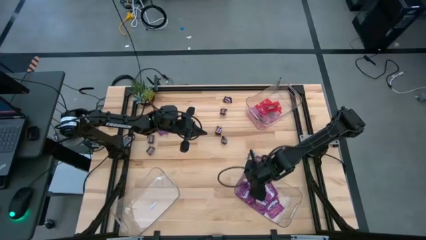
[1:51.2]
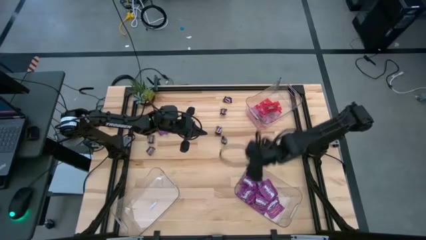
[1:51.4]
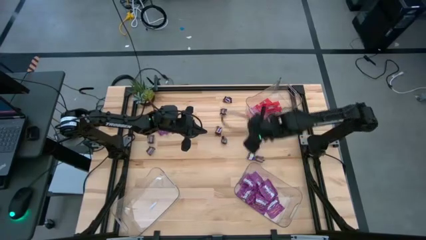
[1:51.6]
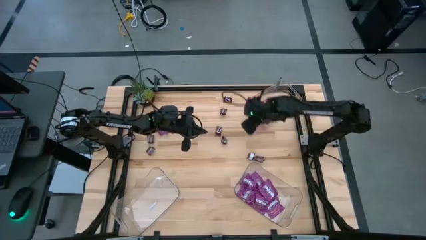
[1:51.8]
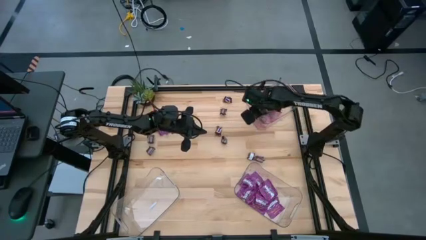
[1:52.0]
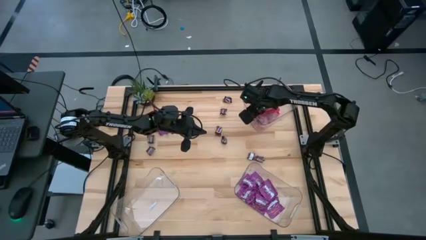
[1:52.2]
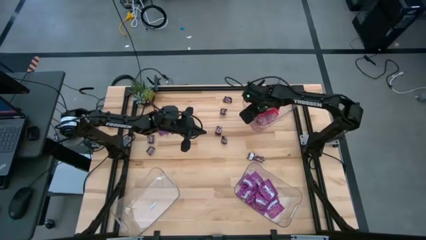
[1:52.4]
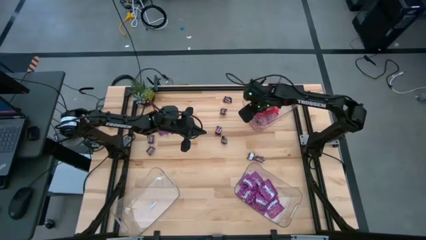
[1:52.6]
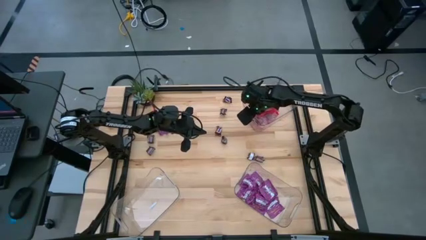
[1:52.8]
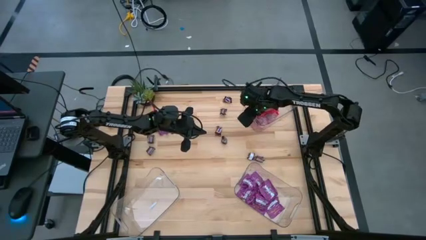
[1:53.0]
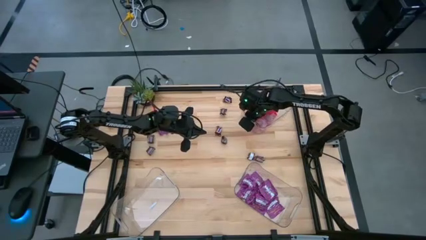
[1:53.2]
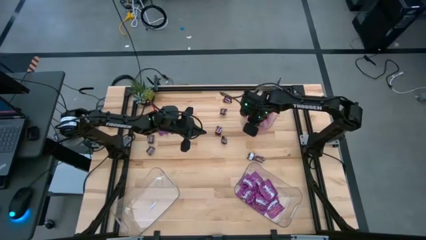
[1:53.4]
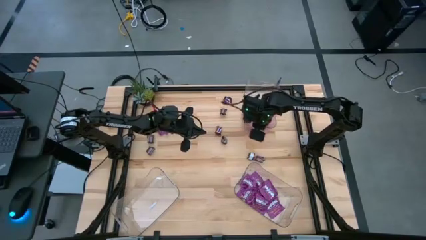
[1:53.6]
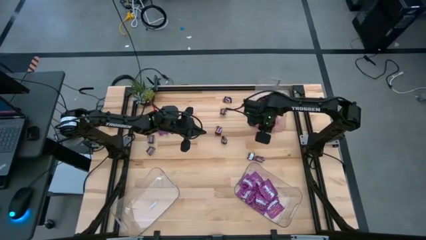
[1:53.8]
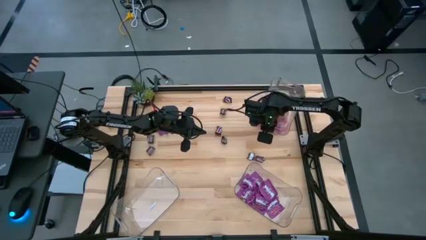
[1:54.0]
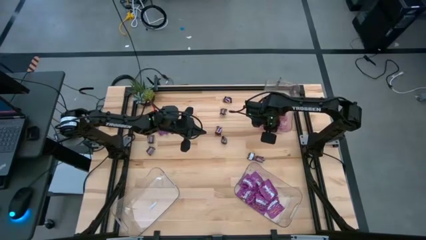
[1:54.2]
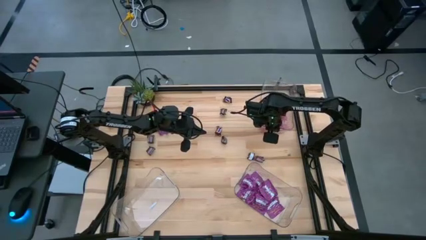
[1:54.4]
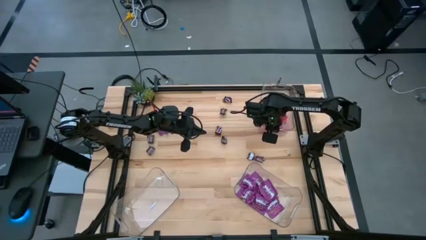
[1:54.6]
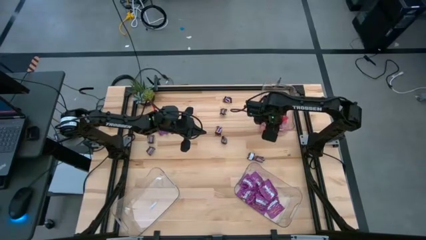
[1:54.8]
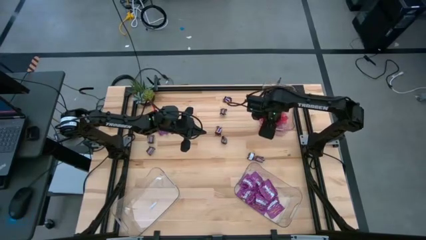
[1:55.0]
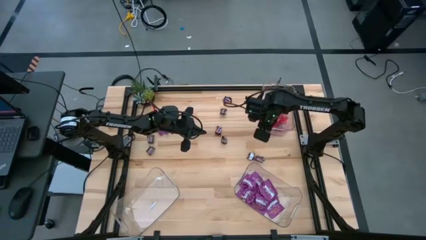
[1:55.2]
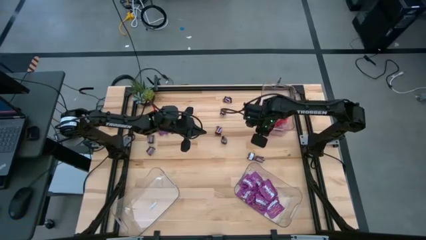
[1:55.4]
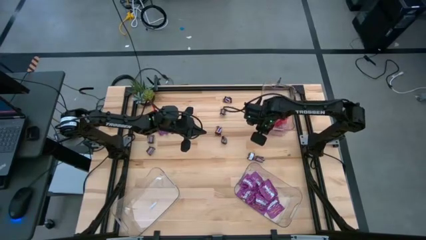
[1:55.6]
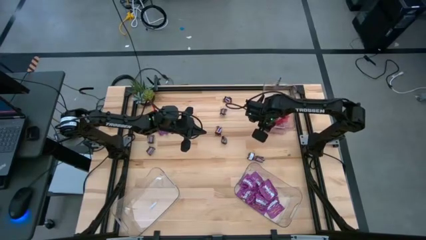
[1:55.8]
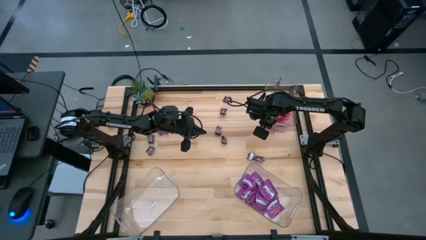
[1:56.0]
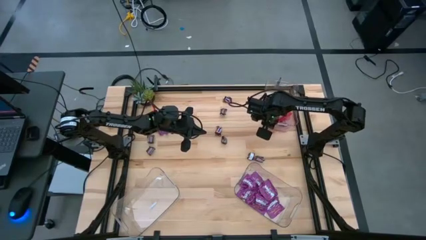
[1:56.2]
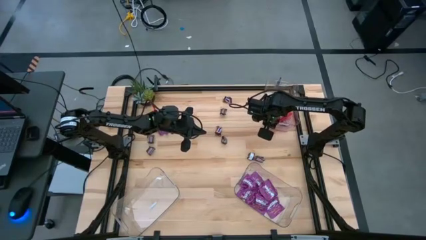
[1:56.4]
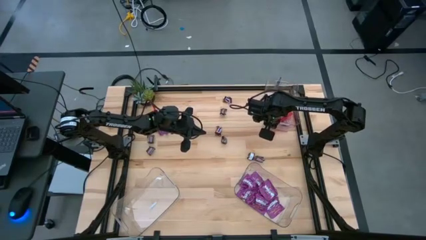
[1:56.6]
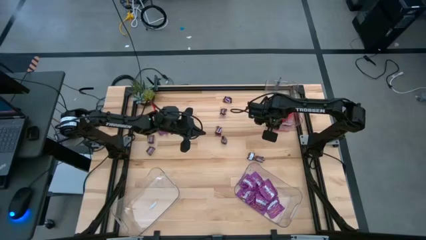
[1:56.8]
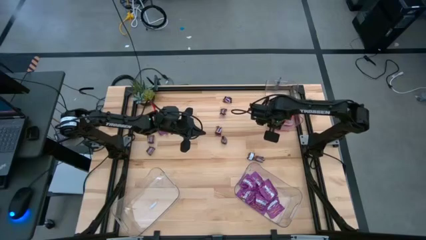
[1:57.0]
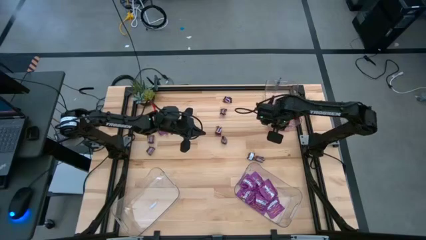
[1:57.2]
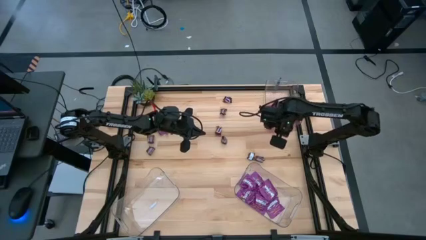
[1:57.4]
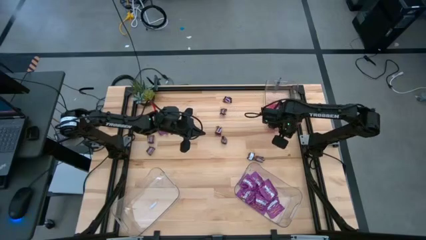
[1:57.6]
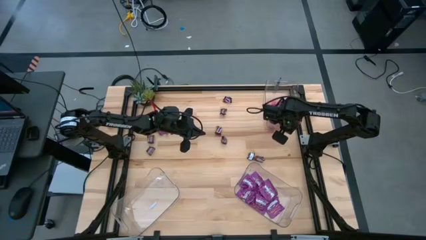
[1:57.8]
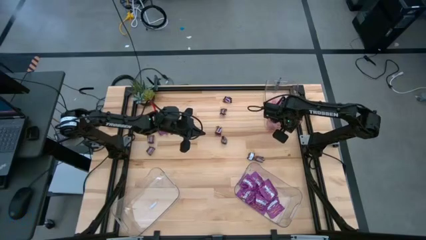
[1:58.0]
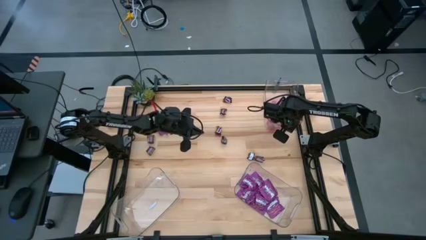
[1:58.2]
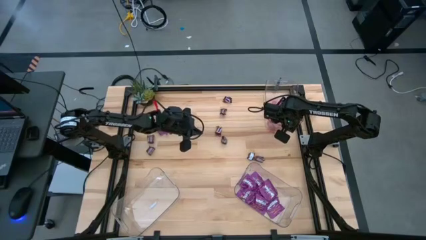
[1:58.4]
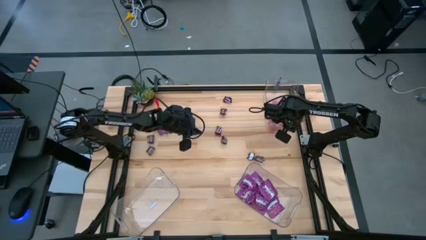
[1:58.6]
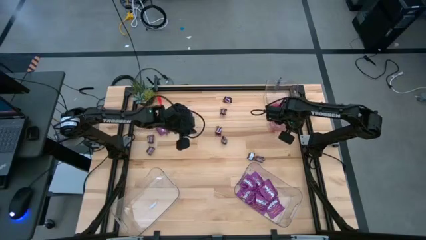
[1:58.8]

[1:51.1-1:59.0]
Task: Sort candy
Adjust the top transparent bin

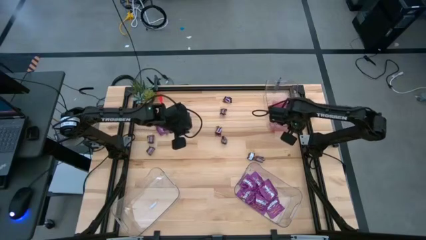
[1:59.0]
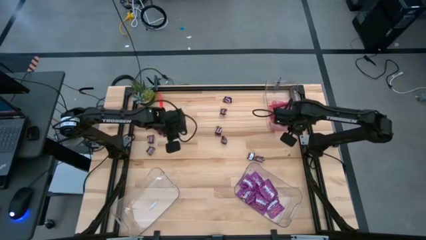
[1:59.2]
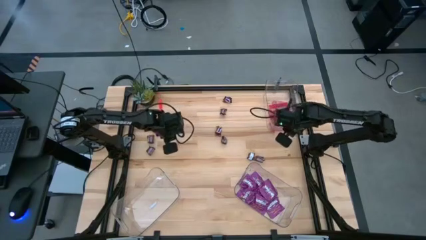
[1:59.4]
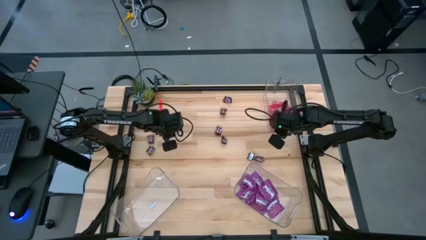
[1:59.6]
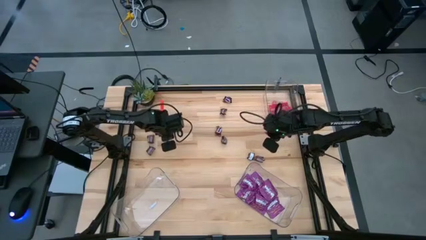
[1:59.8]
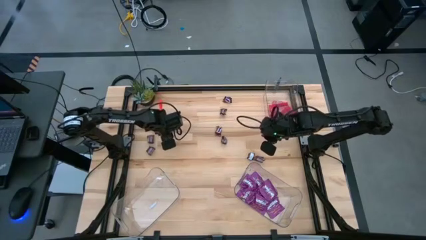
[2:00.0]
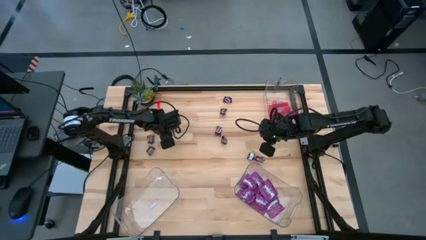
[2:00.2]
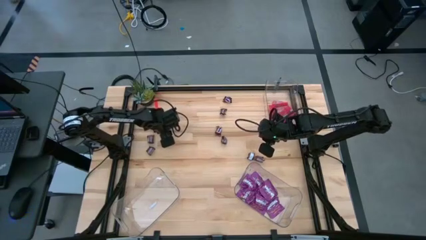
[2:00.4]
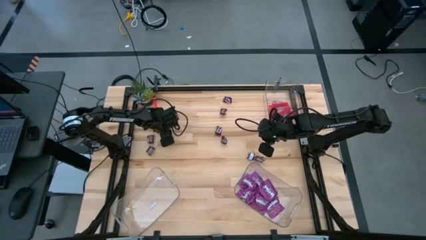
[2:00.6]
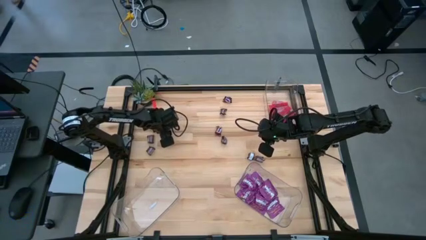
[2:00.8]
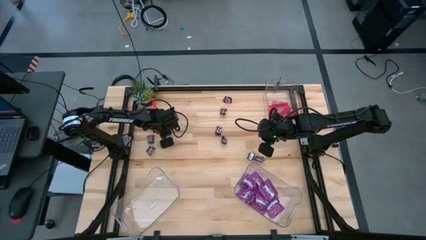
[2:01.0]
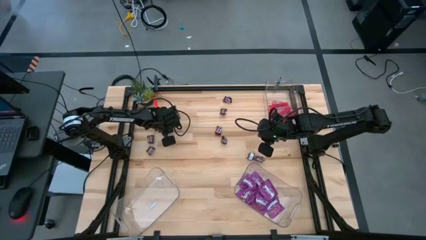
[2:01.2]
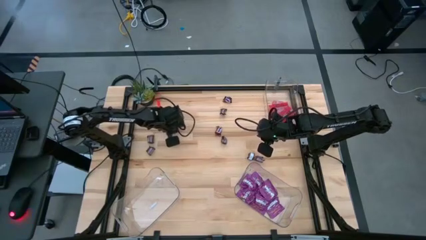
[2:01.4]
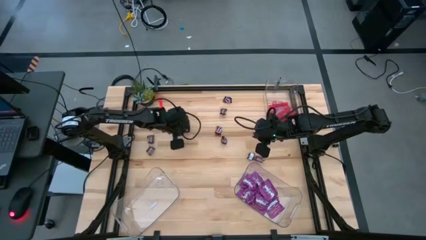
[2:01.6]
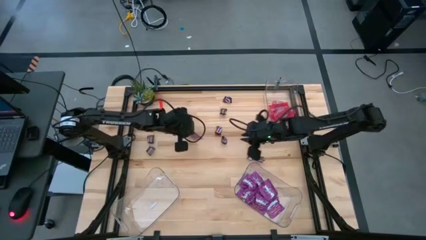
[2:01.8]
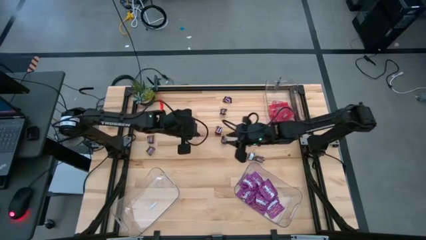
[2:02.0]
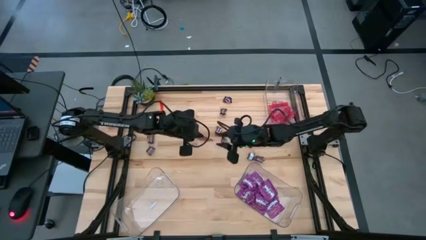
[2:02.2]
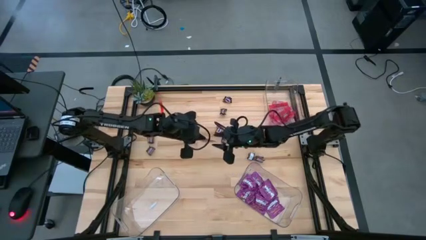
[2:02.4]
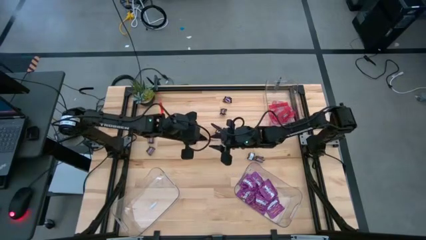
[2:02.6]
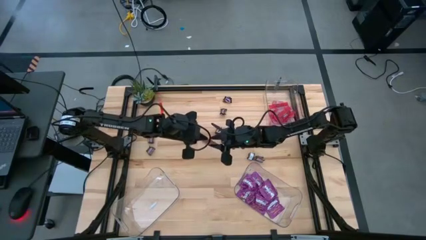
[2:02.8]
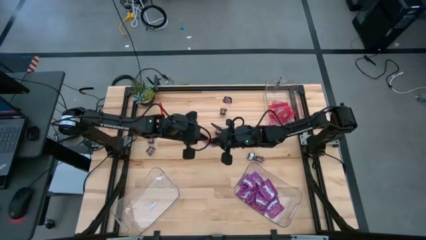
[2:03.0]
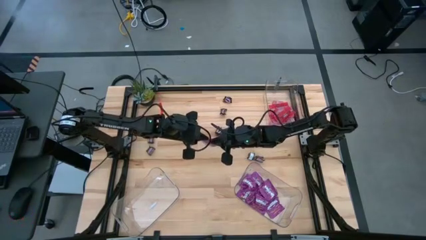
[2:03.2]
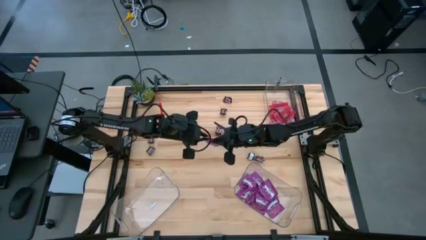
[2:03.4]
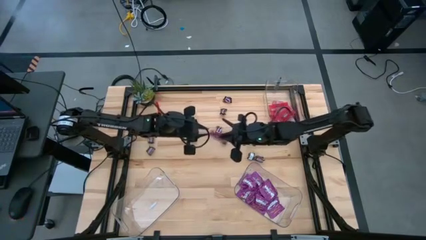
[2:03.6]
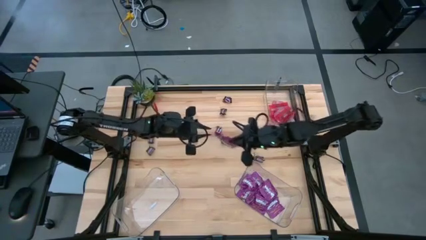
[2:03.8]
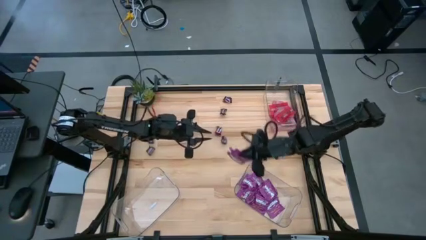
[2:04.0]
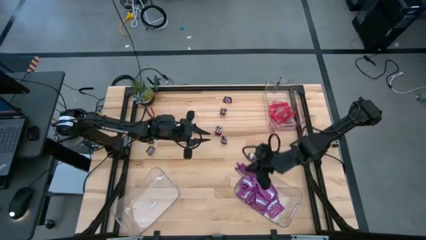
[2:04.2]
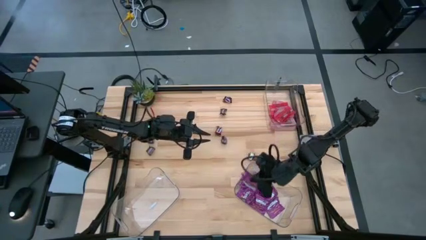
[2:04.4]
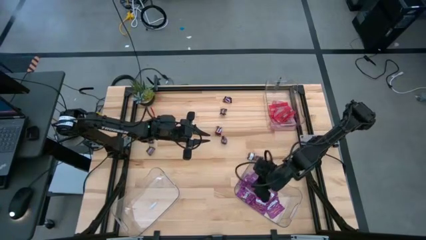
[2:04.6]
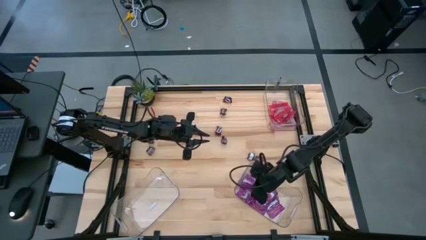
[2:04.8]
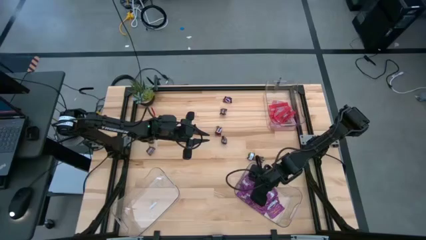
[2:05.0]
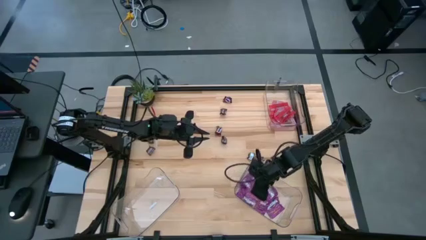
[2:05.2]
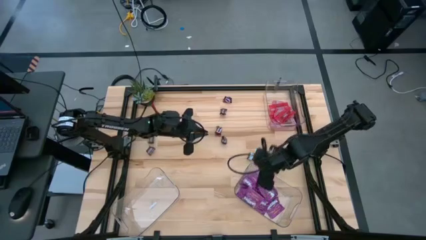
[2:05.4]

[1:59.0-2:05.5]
Put the violet candy into the bottom right transparent bin

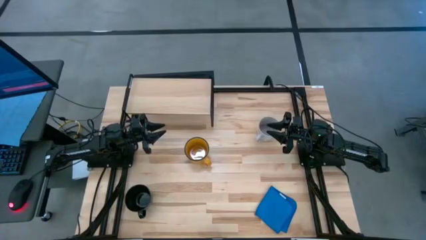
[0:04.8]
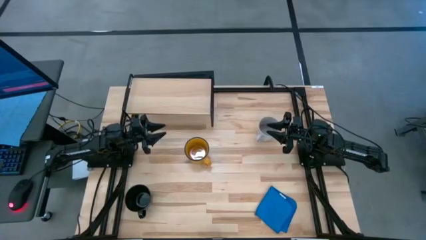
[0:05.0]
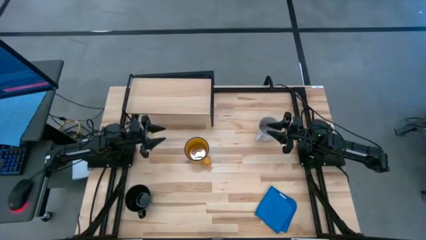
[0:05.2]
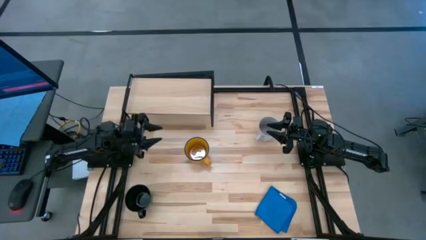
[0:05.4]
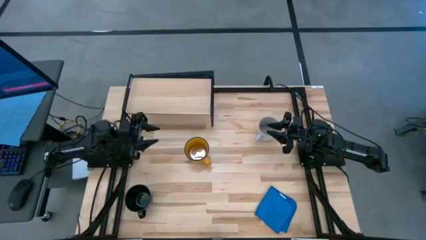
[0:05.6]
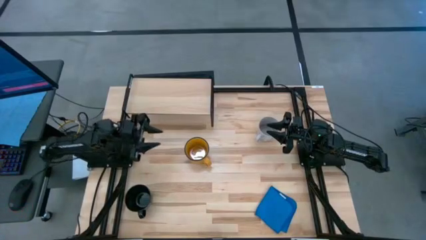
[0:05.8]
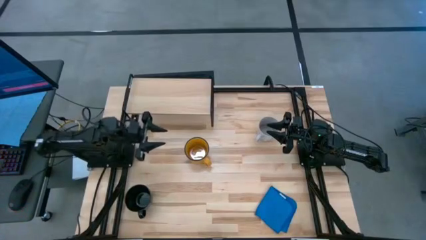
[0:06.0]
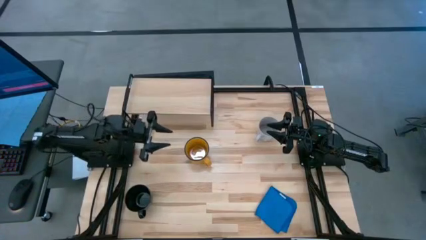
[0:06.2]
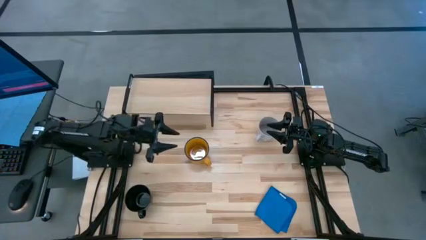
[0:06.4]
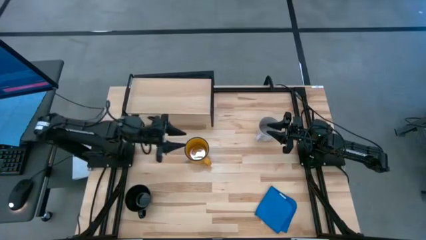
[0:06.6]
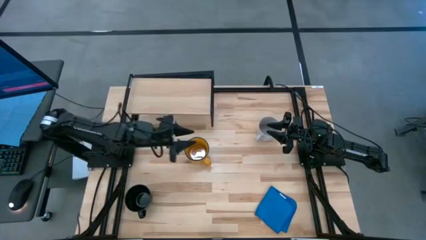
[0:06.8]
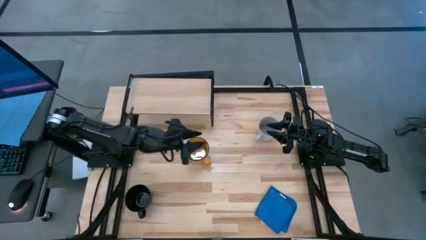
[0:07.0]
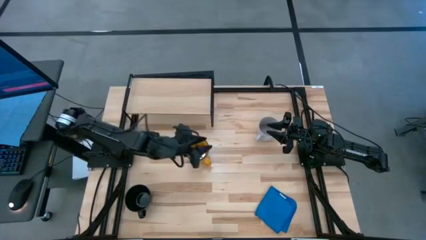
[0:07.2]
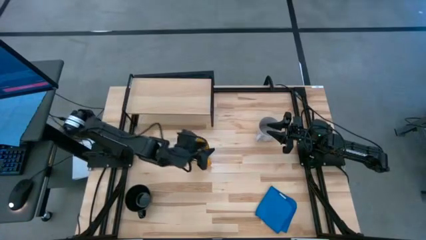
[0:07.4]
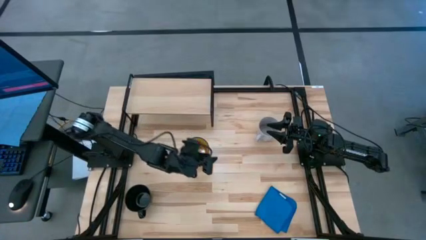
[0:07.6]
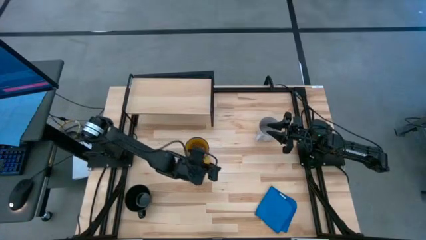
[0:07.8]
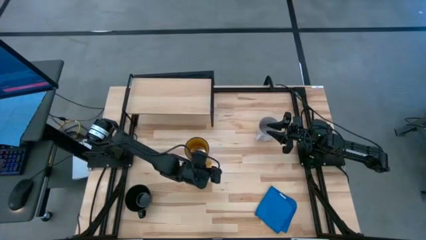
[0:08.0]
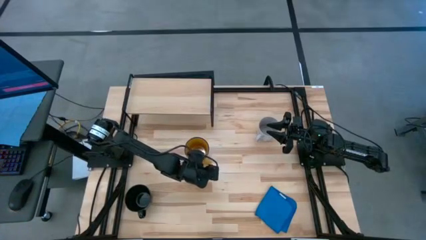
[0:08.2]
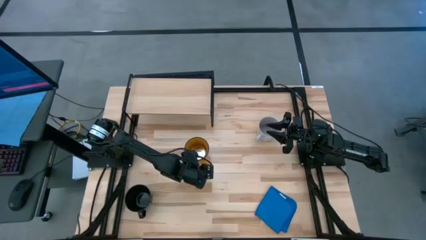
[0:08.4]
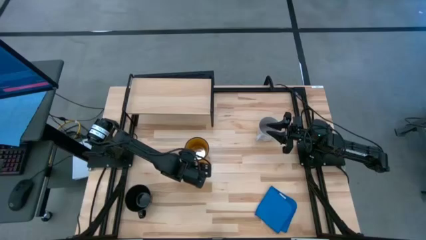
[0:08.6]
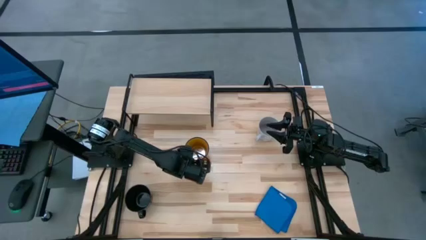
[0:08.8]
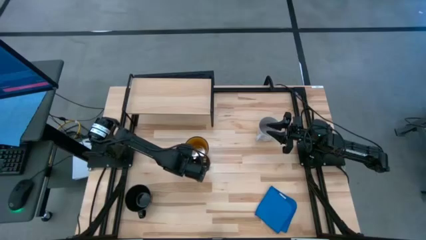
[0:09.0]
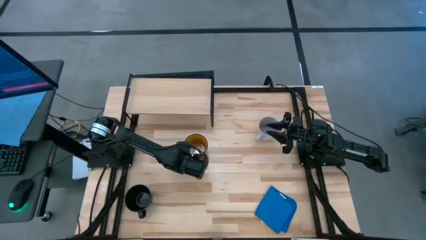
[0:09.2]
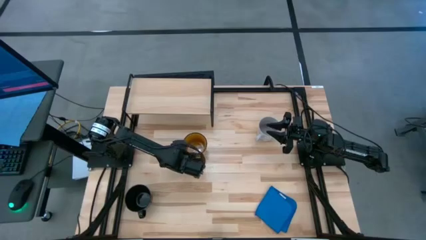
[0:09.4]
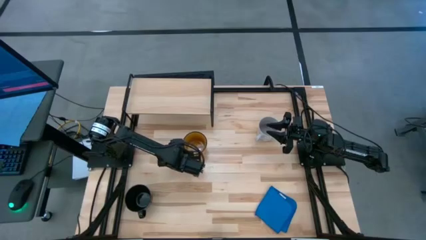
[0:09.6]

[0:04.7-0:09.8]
Task: Stack small to large cups/mugs on shelf
Put the yellow mug on the shelf
